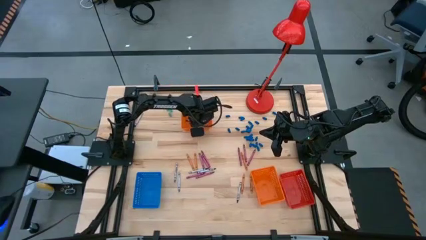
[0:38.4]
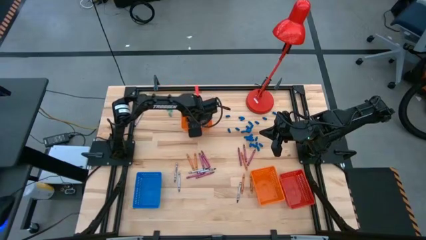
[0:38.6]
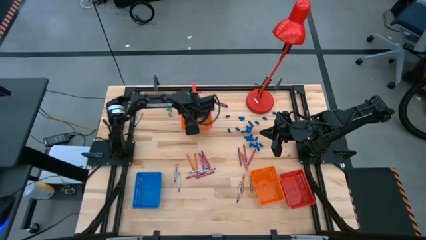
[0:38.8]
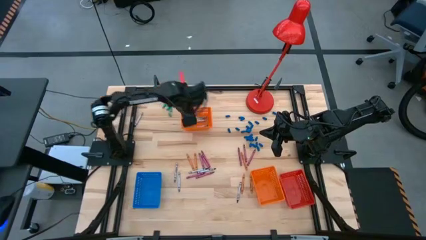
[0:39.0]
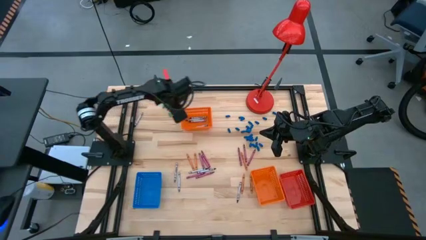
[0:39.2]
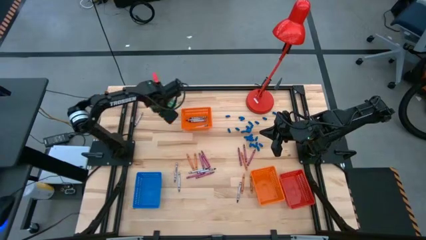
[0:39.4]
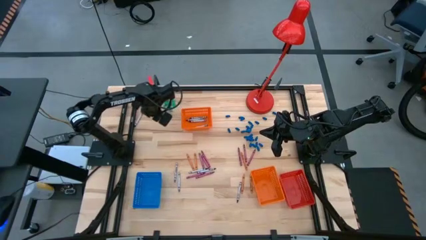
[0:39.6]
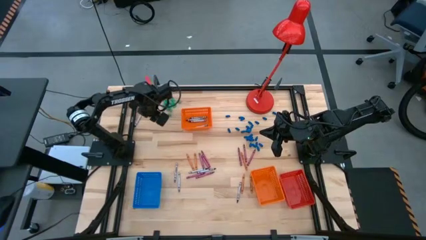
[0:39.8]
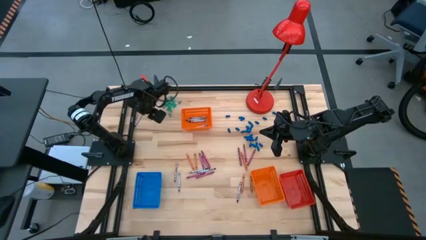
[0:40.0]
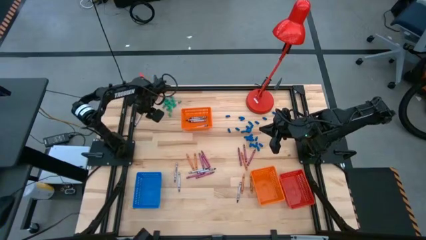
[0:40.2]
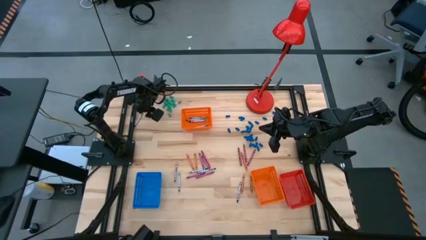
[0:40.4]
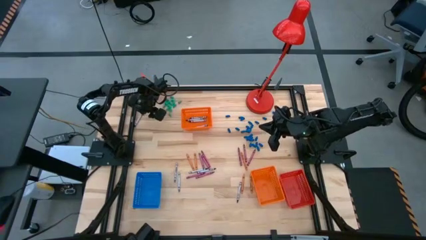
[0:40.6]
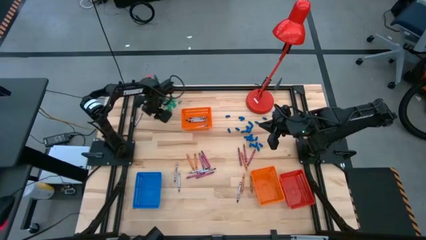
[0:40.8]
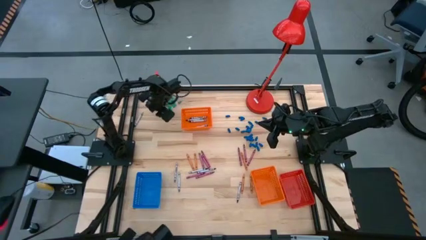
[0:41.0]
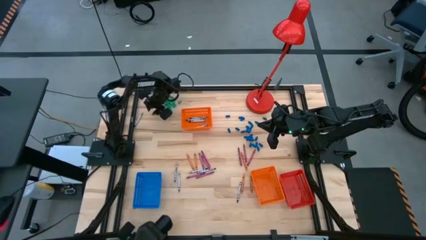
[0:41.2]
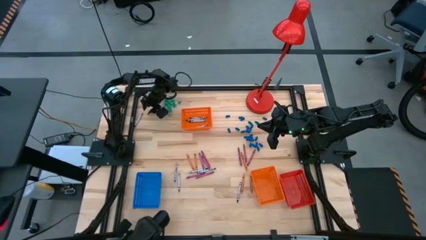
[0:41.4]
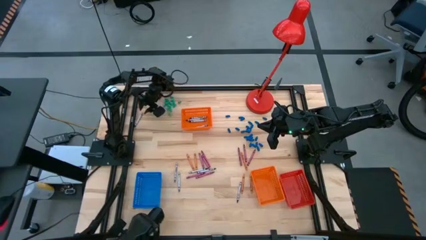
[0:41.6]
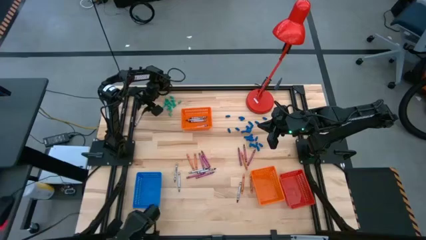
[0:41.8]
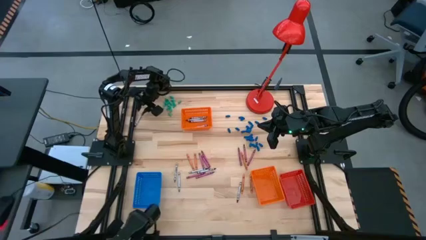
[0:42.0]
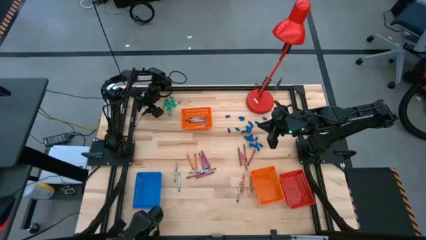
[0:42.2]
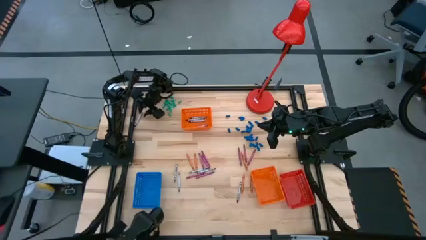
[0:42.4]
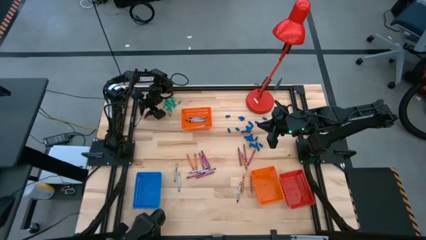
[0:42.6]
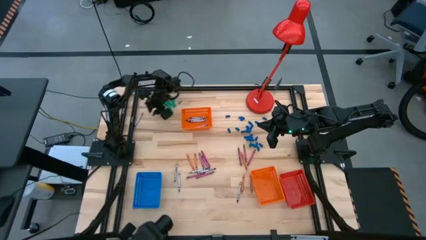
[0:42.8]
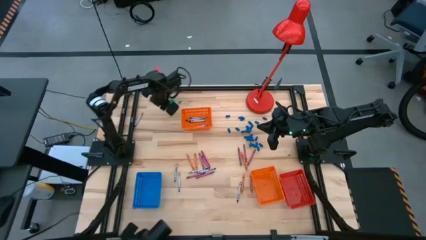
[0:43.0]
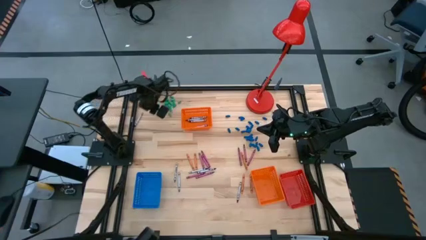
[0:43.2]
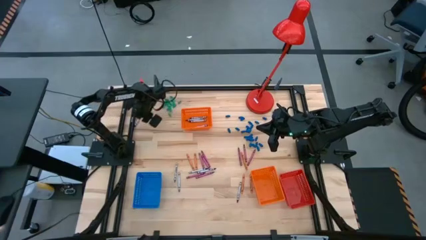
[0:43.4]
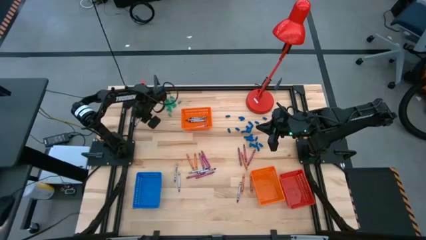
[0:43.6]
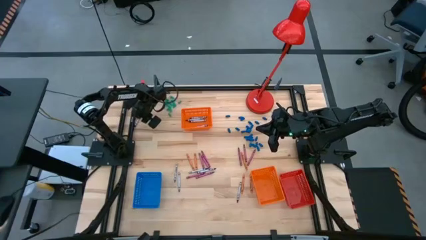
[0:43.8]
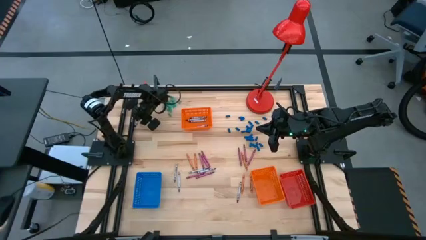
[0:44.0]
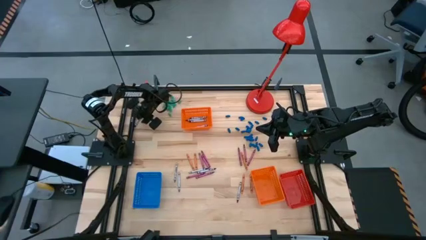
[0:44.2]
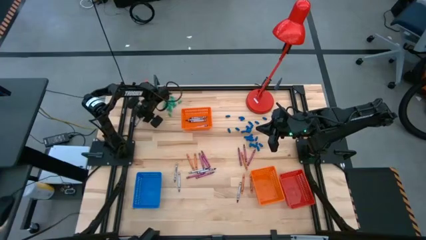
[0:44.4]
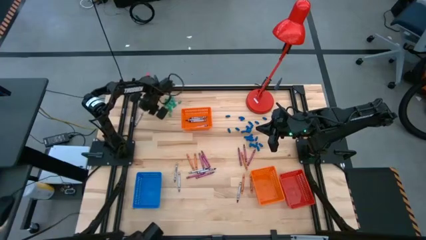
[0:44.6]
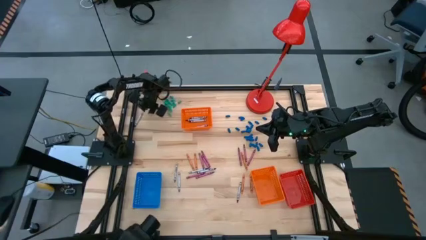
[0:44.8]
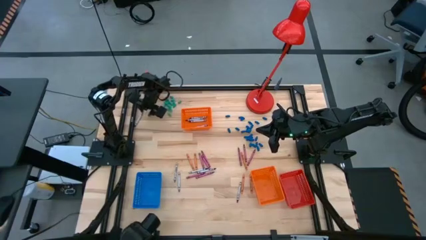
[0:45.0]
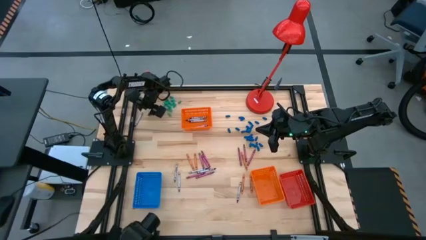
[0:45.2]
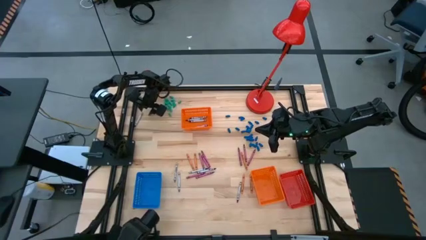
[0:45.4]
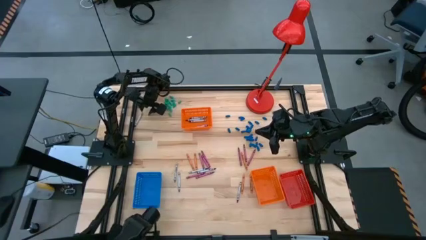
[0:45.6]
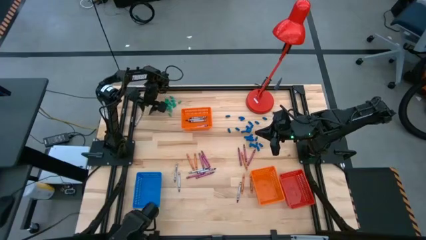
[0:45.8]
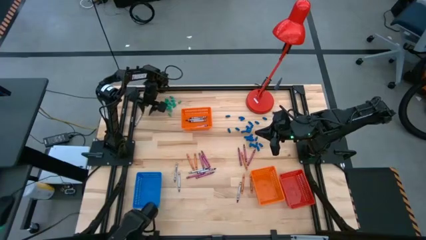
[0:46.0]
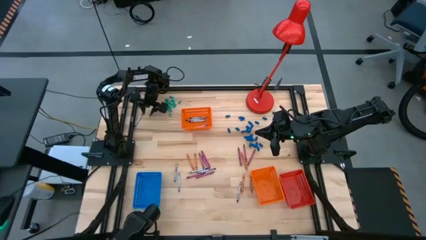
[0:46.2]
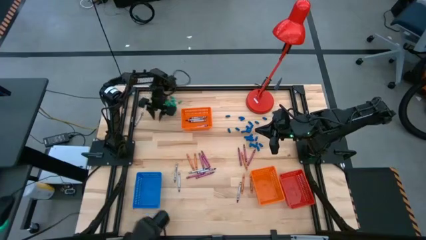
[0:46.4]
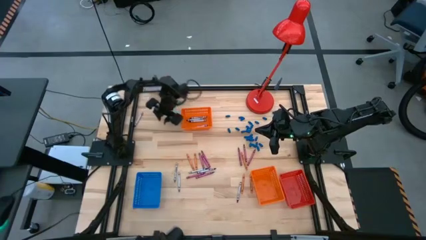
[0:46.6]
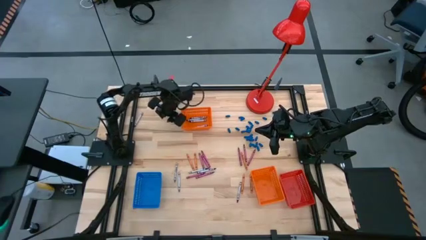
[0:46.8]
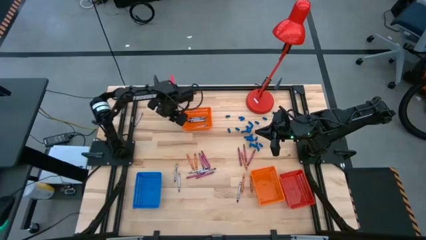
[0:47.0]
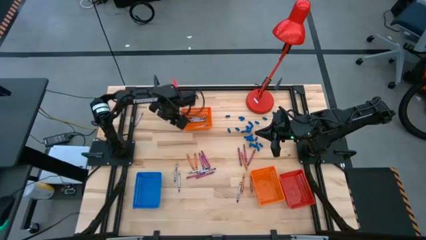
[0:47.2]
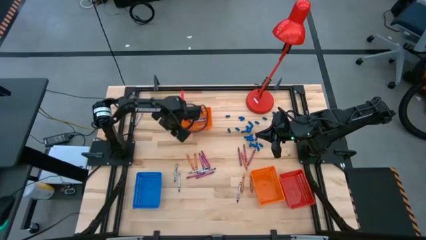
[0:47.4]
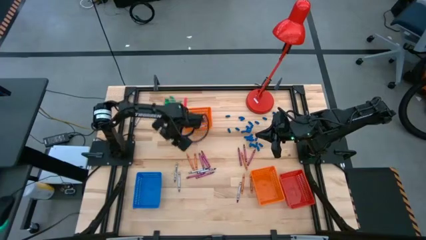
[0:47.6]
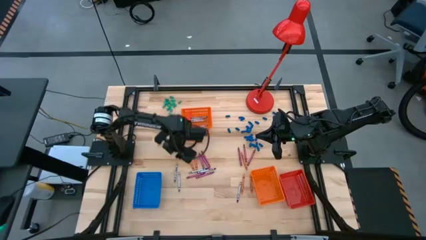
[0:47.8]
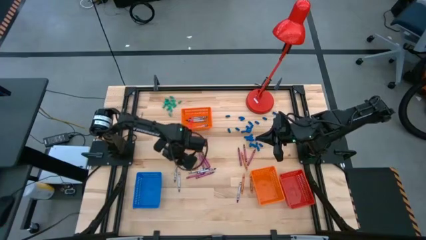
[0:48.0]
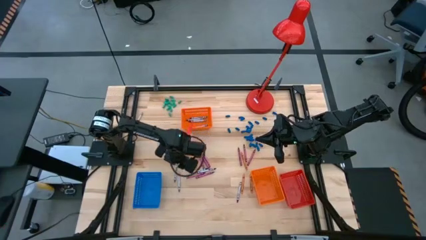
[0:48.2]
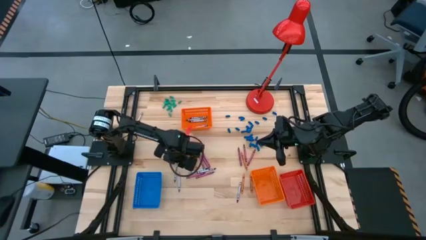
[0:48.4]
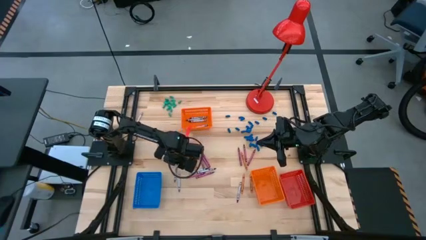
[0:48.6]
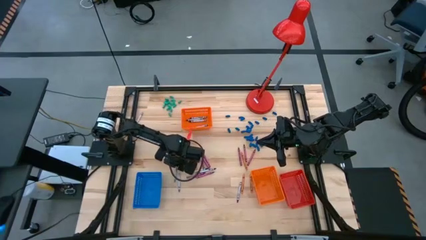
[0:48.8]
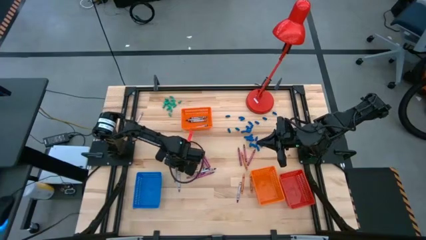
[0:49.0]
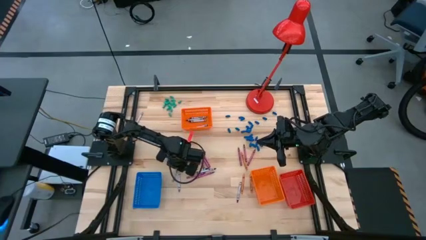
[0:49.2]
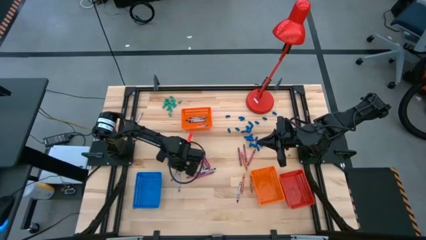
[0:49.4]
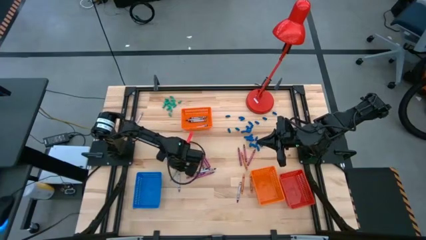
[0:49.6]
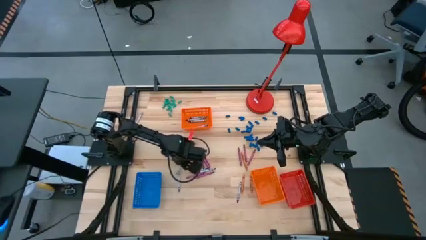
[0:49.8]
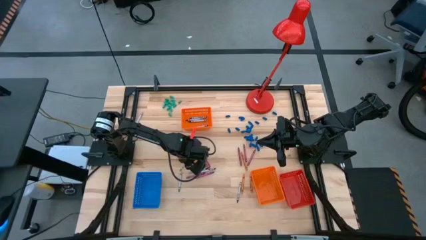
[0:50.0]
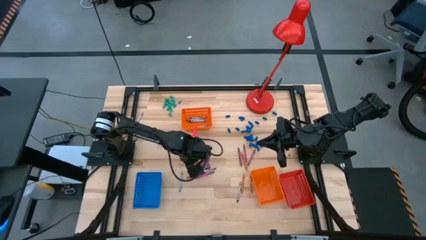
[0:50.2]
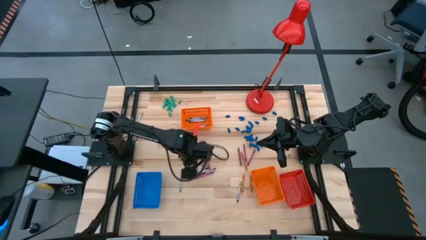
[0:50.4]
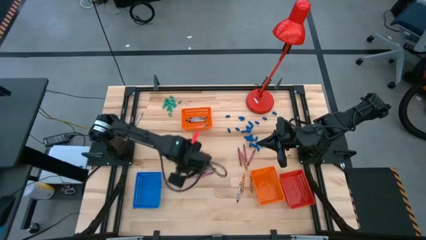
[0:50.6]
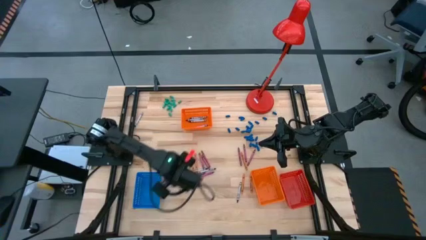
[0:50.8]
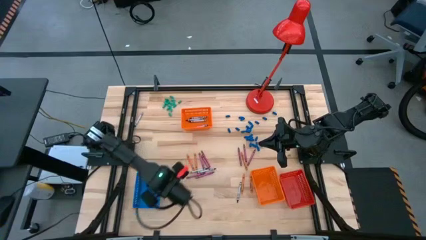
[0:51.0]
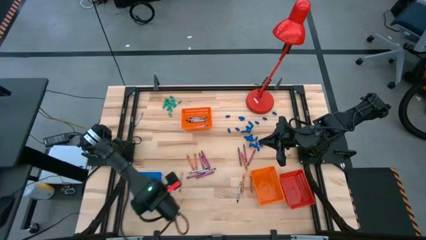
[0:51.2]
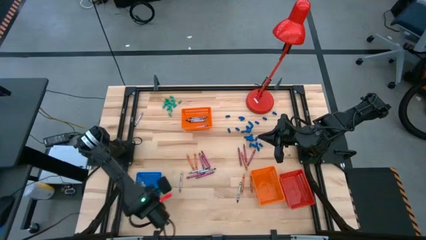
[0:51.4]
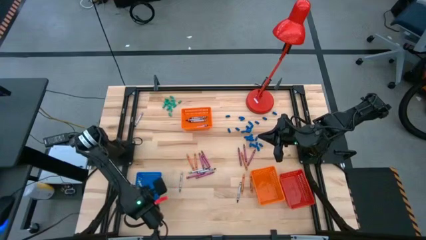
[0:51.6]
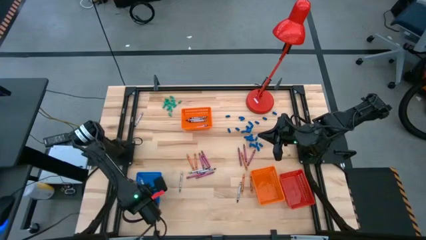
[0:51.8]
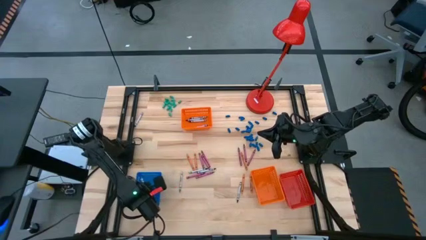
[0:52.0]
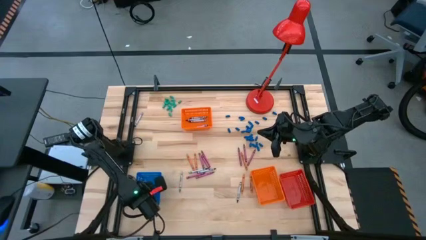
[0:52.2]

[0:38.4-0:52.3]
Task: Sort crayons
Put the gray crayon into the blue bin
